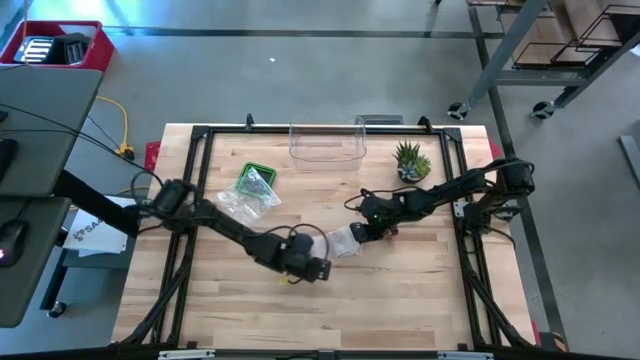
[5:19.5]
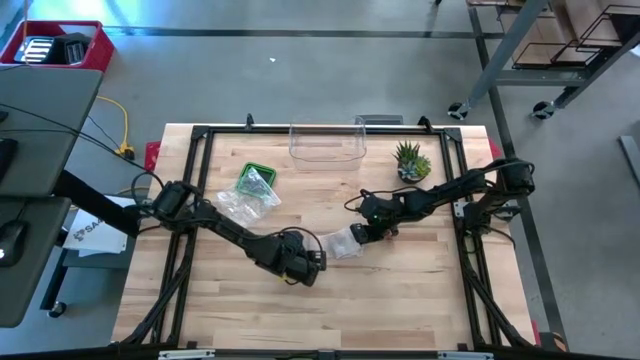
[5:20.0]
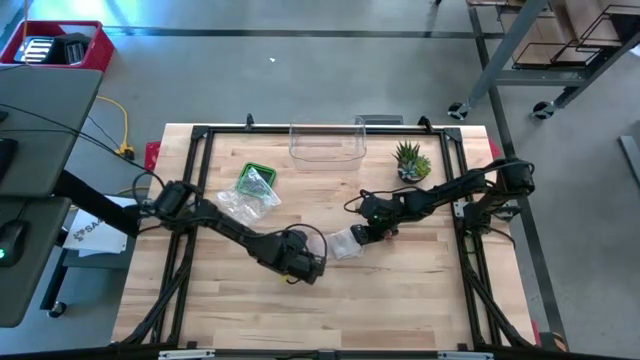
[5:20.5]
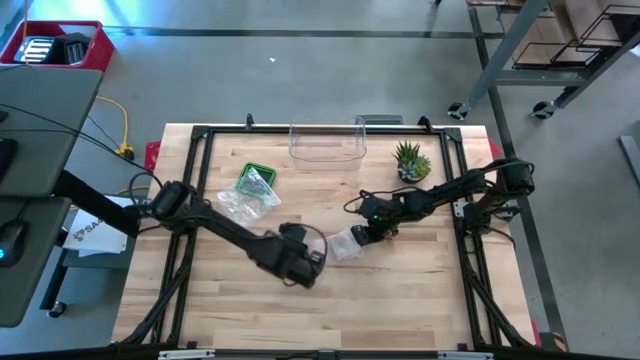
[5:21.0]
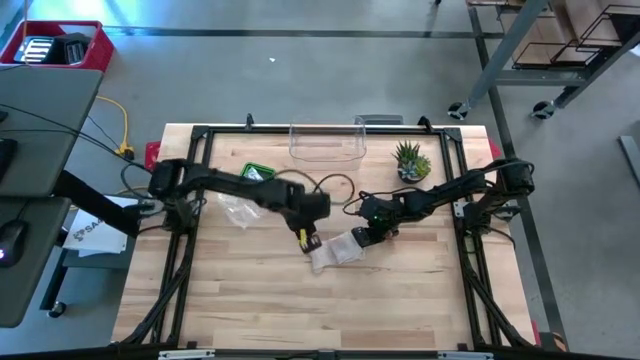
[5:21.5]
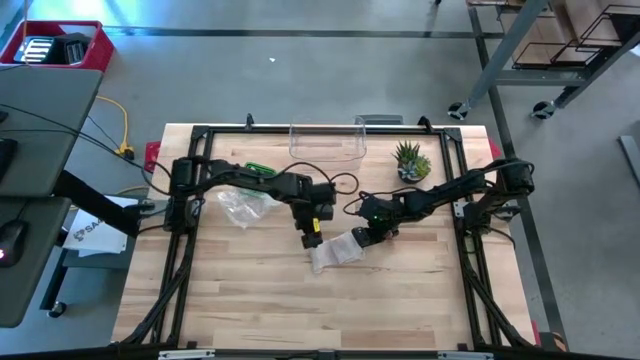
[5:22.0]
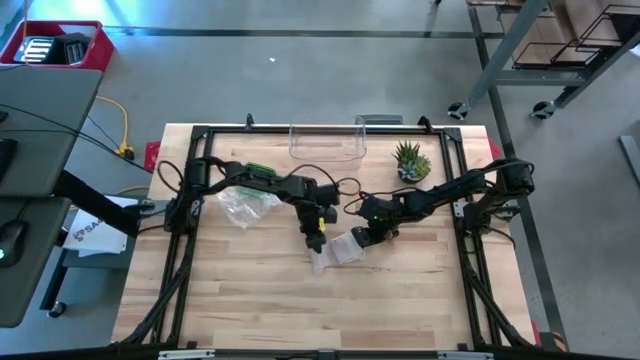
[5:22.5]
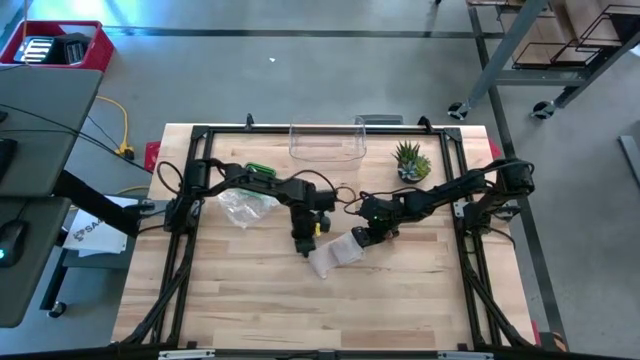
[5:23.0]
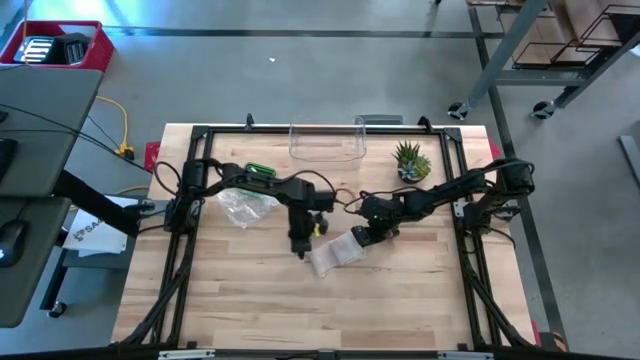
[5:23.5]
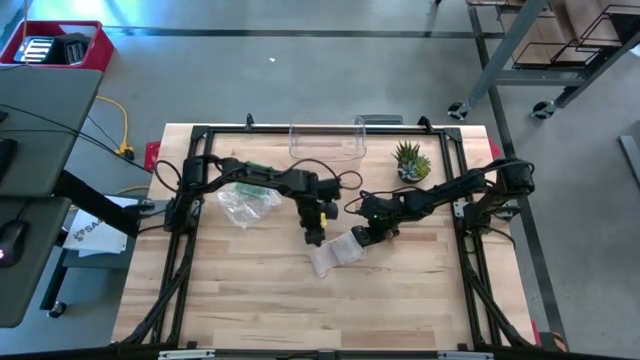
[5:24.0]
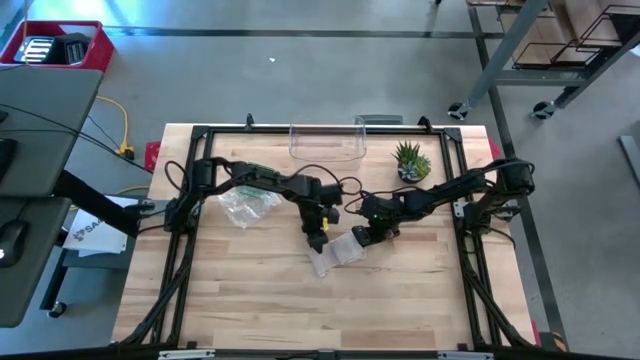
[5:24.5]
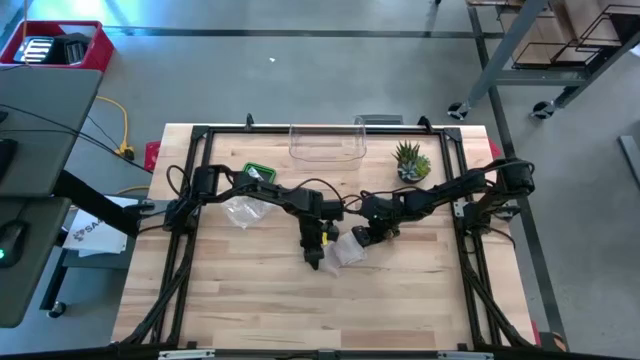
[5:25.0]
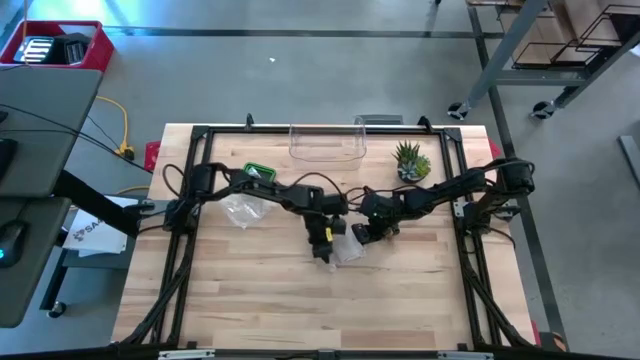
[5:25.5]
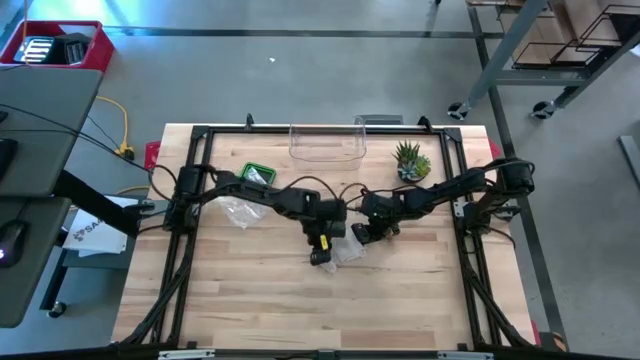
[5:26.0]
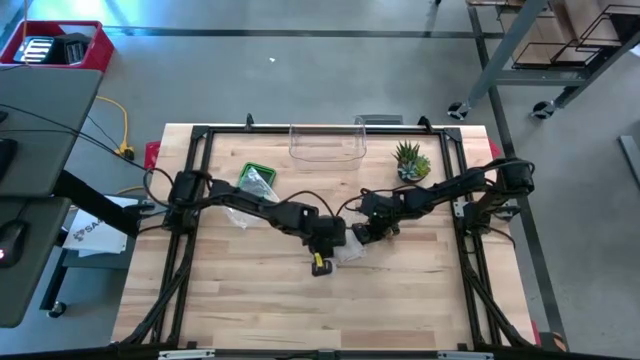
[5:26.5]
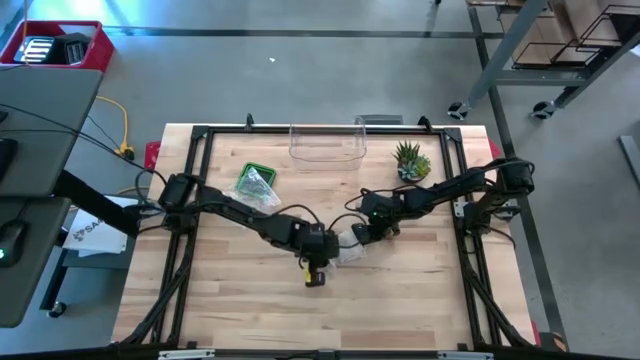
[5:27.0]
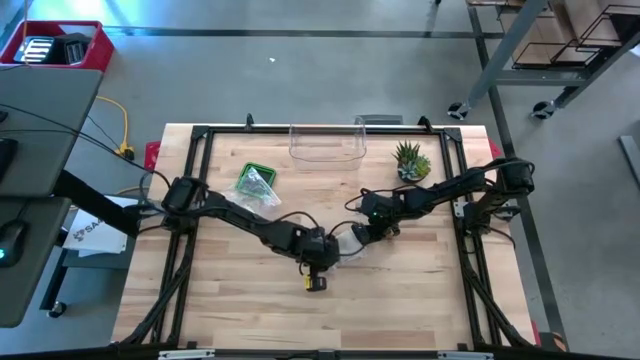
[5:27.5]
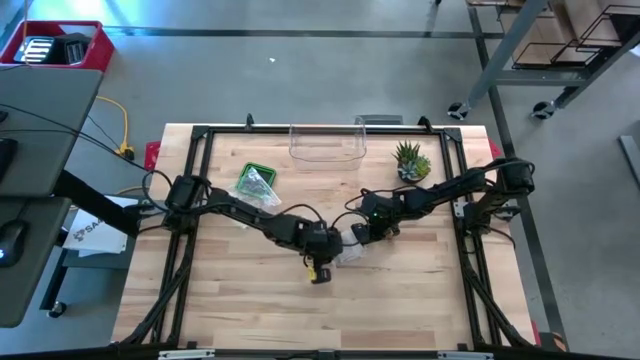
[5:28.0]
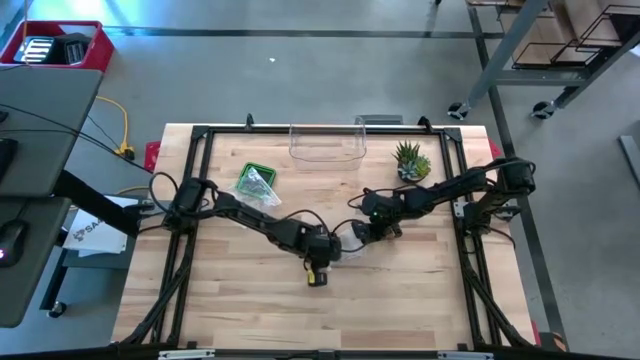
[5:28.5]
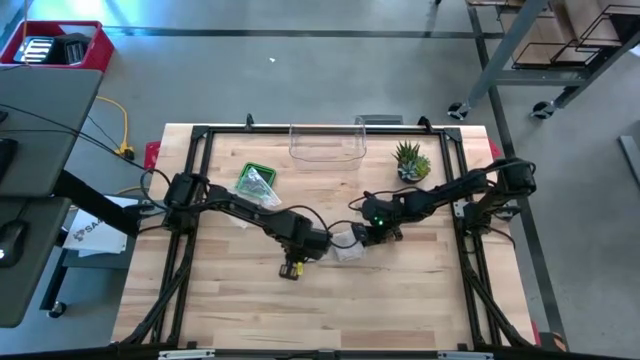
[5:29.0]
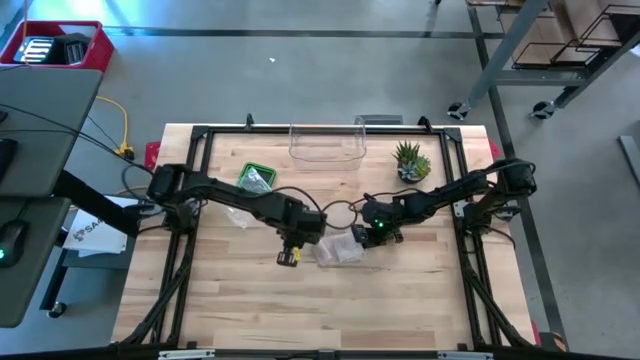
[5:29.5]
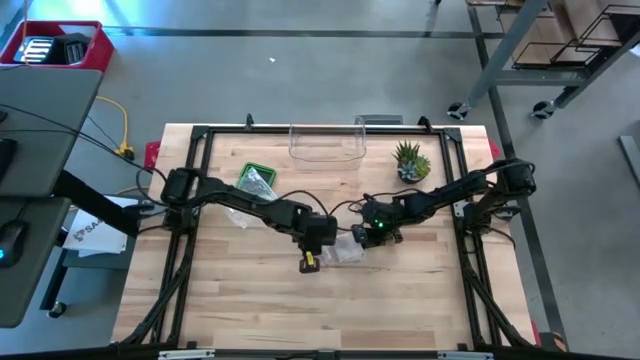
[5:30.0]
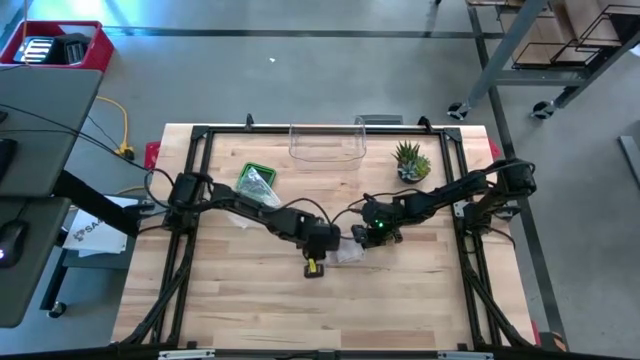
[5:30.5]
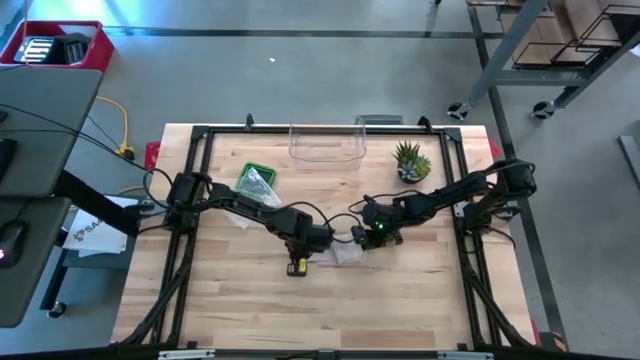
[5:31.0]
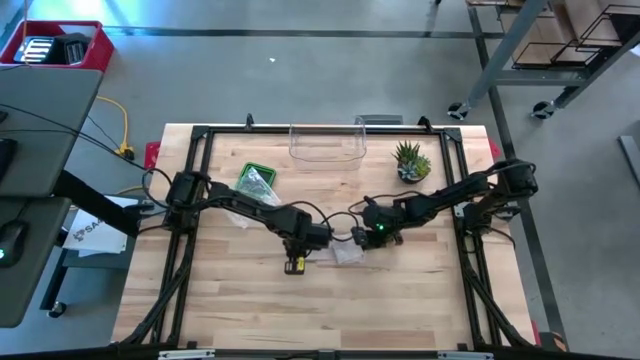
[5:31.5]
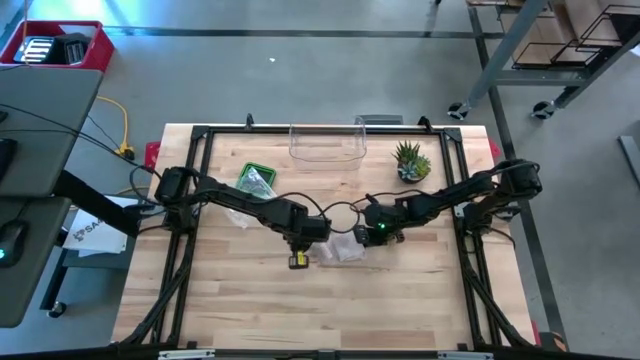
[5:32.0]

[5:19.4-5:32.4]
Task: Roll bandage
Roll the bandage

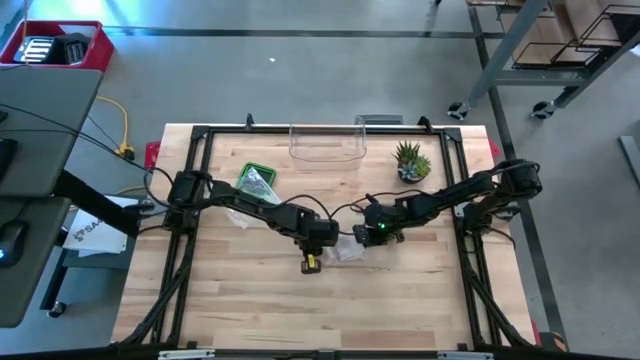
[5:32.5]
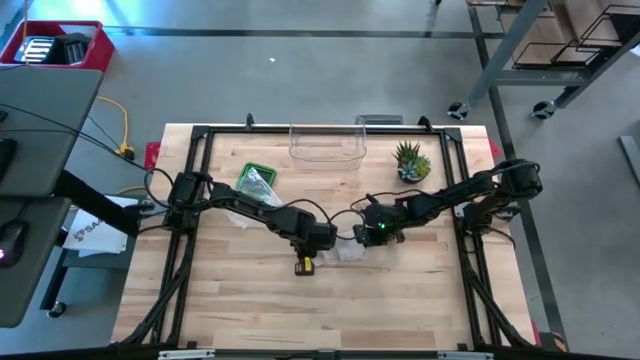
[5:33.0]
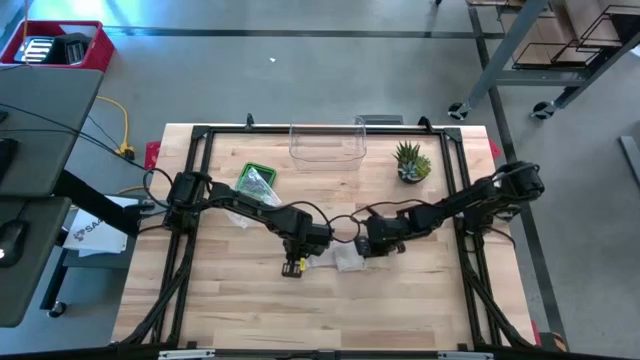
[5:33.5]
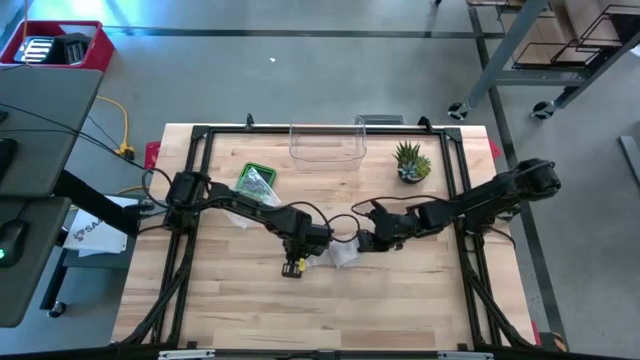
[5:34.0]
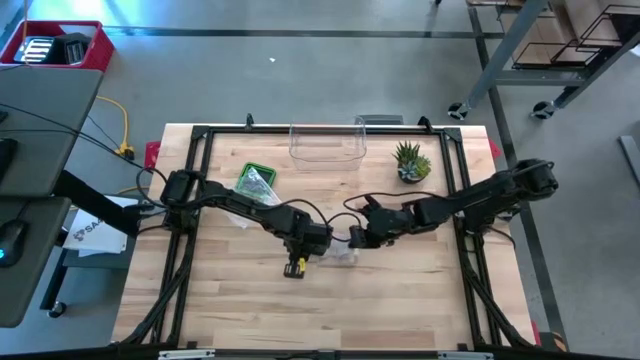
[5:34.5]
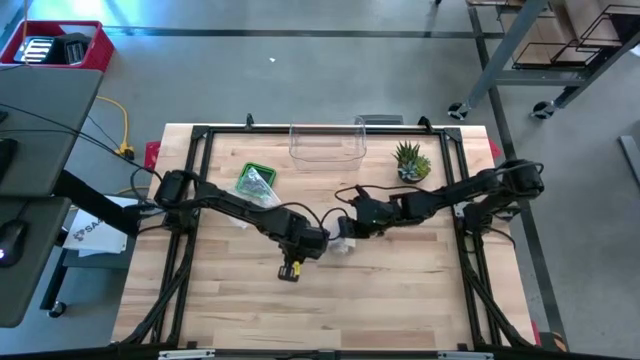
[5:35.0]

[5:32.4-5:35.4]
Roll the bandage

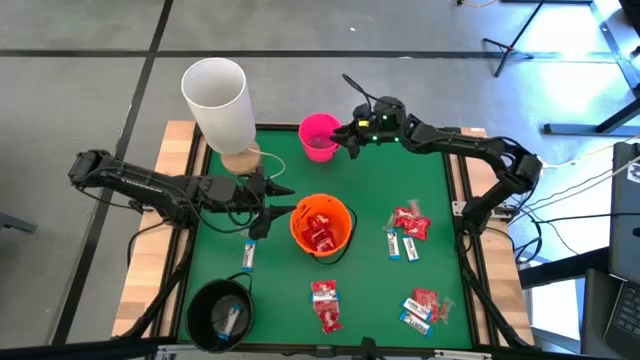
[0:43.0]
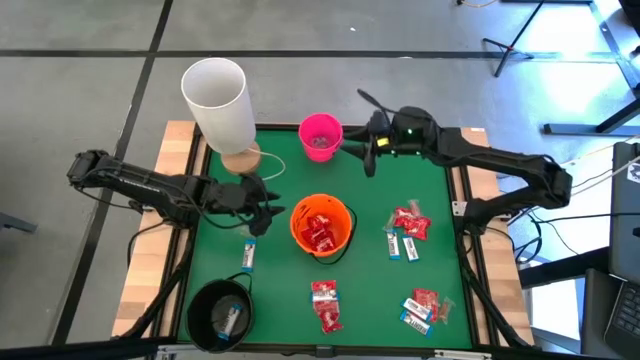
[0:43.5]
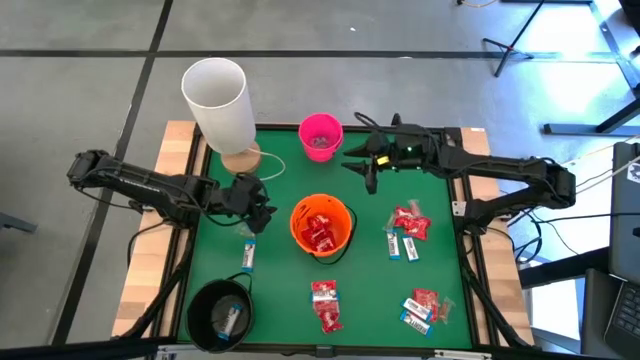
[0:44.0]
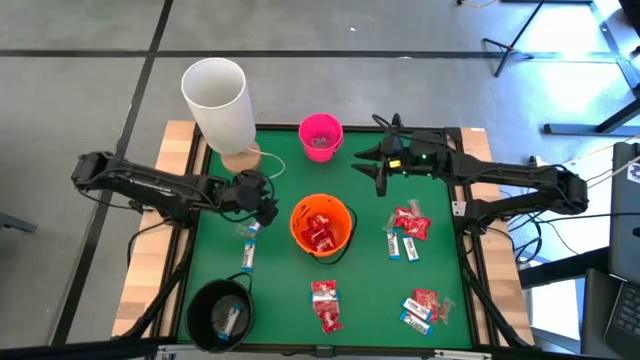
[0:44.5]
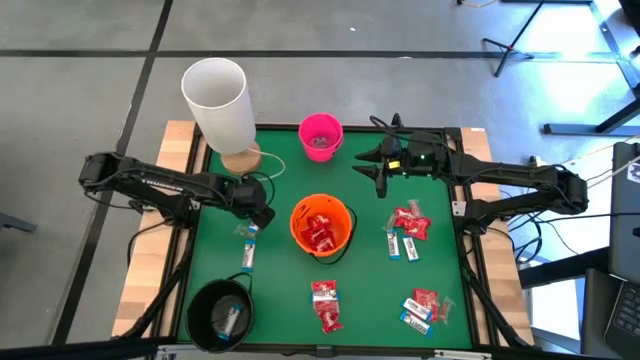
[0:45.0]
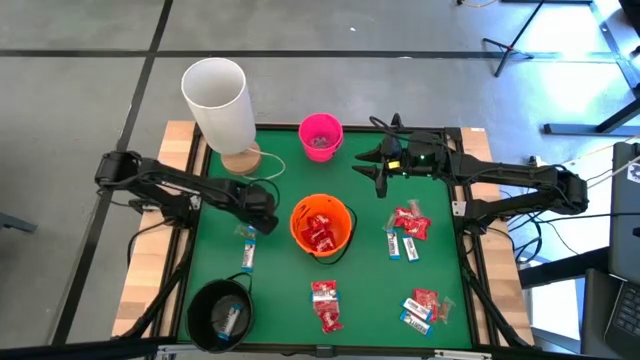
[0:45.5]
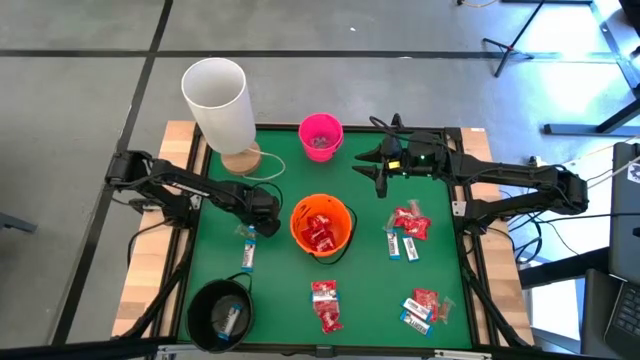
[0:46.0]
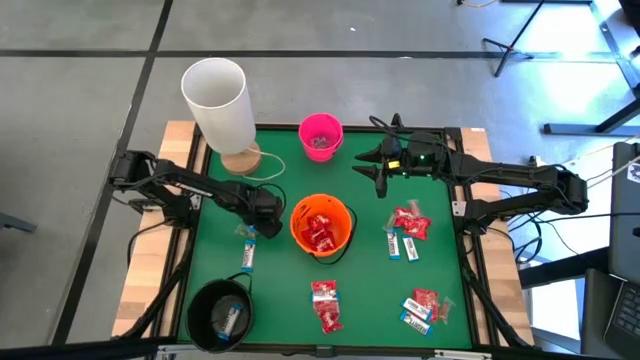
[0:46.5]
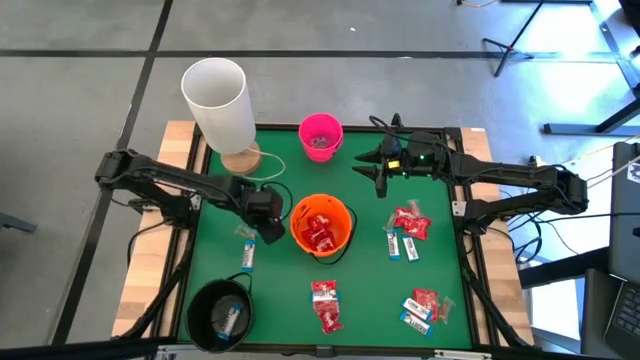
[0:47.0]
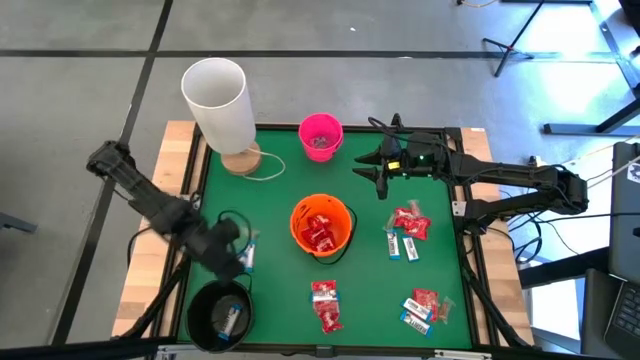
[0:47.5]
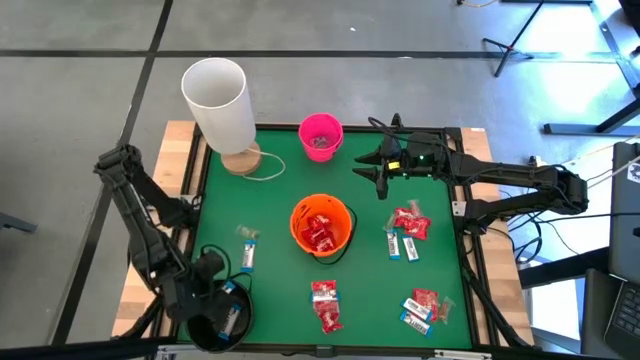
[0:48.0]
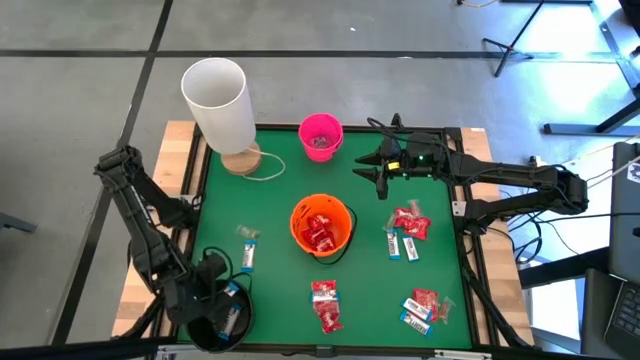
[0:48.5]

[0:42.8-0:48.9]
Task: Sort candy
Put the white chocolate into the black bucket
